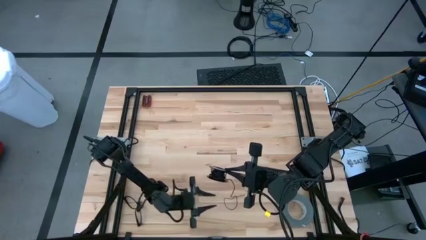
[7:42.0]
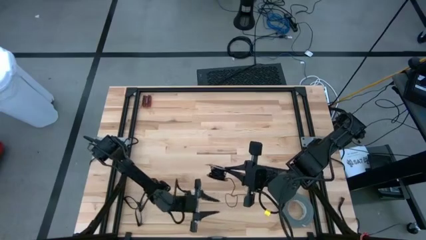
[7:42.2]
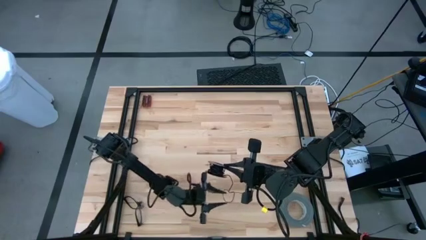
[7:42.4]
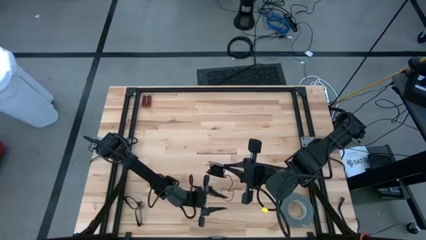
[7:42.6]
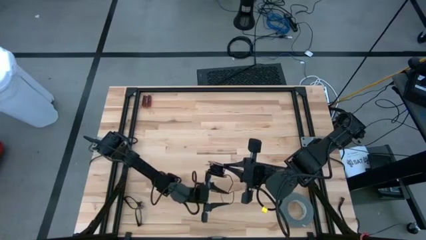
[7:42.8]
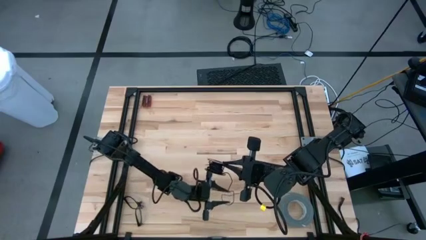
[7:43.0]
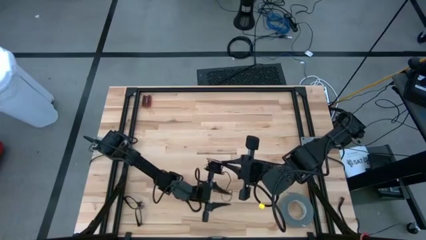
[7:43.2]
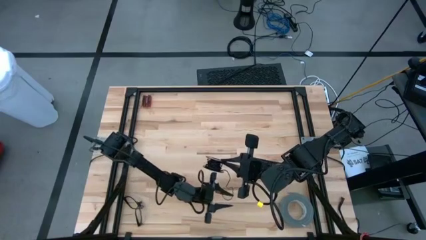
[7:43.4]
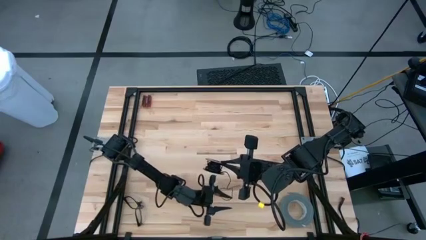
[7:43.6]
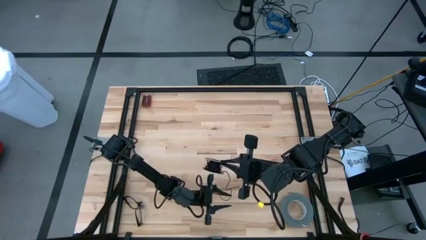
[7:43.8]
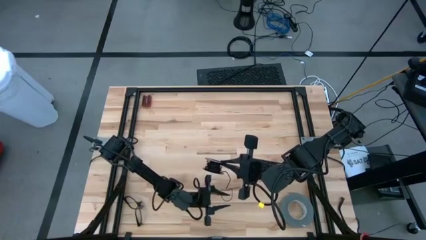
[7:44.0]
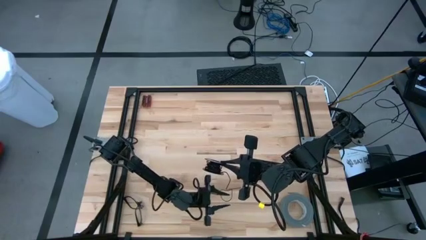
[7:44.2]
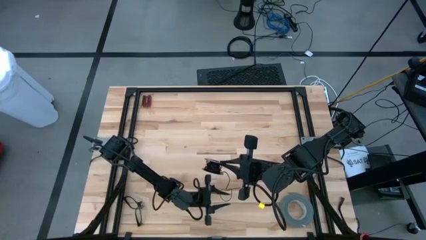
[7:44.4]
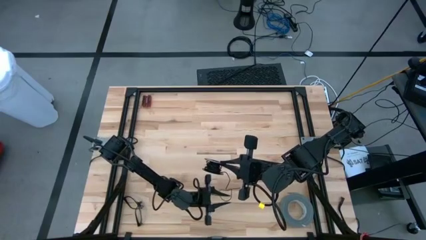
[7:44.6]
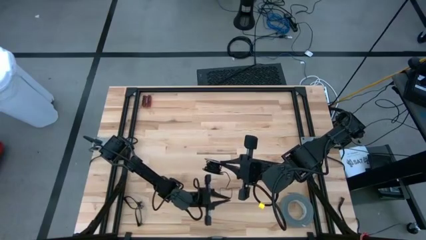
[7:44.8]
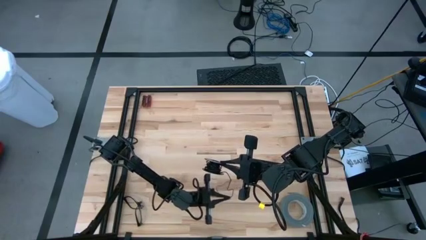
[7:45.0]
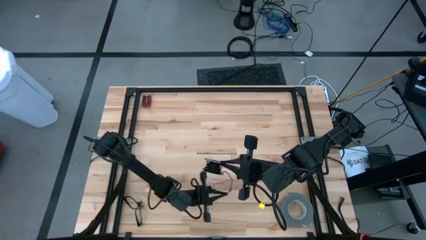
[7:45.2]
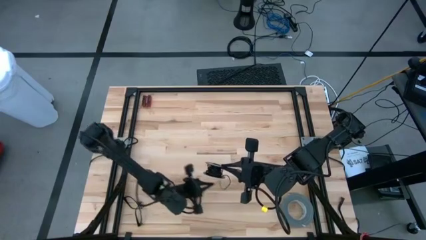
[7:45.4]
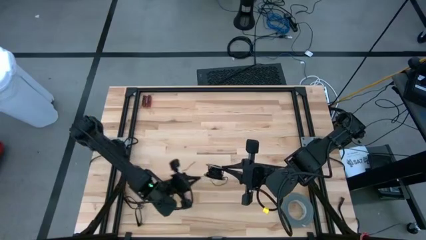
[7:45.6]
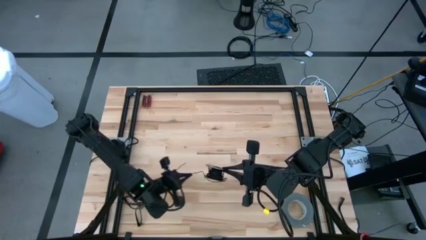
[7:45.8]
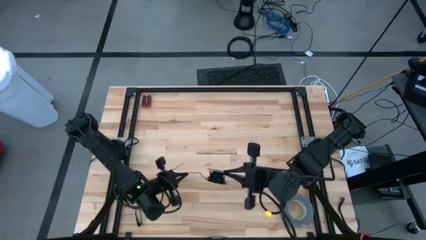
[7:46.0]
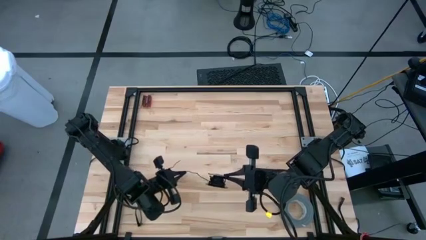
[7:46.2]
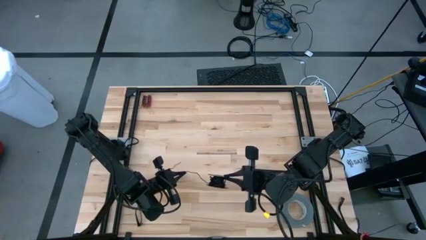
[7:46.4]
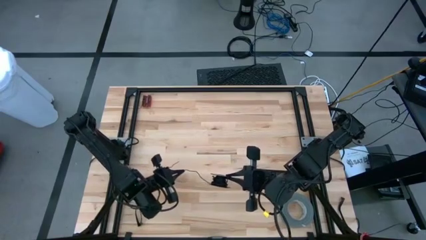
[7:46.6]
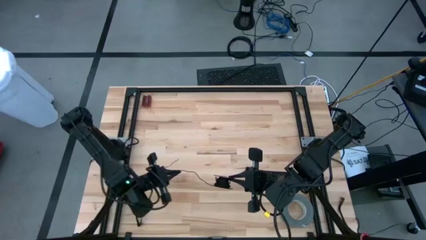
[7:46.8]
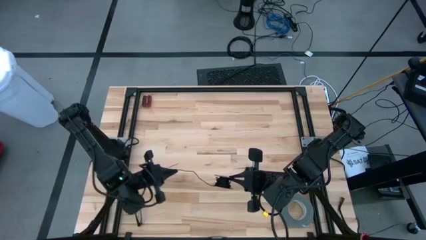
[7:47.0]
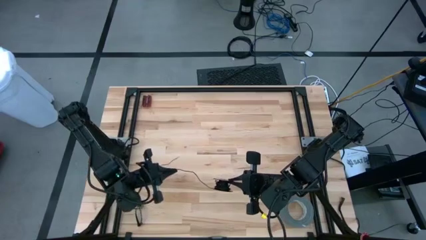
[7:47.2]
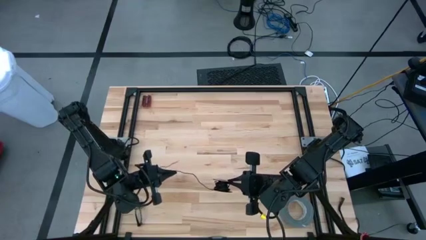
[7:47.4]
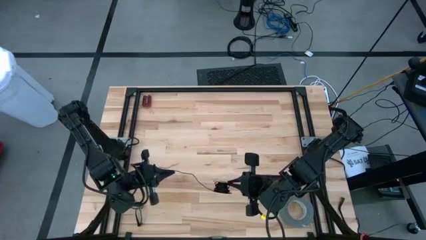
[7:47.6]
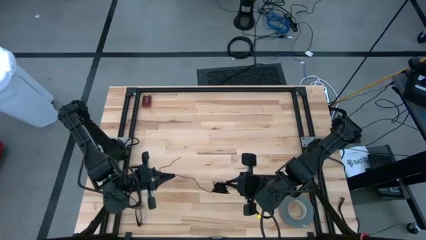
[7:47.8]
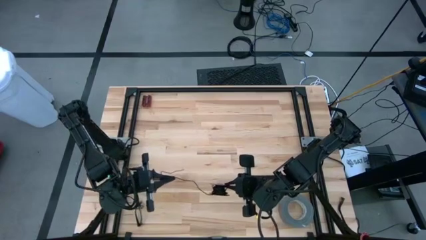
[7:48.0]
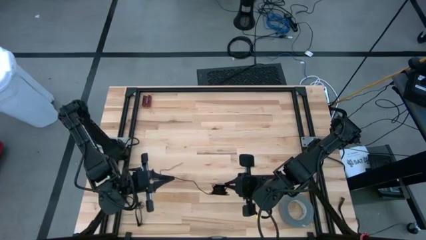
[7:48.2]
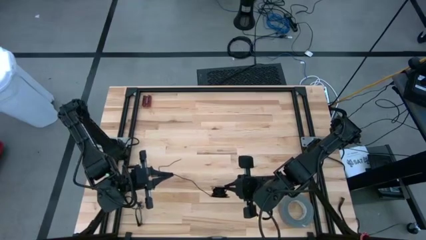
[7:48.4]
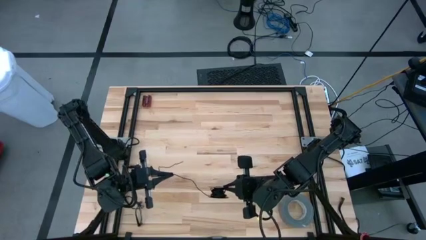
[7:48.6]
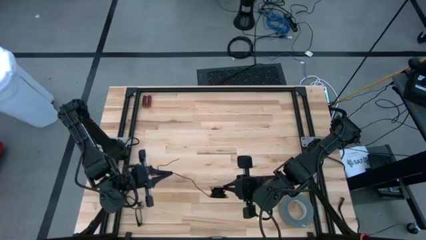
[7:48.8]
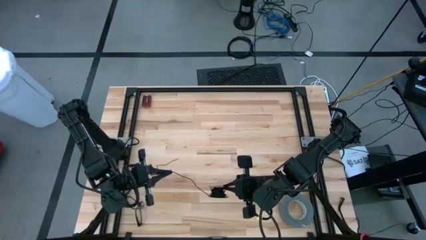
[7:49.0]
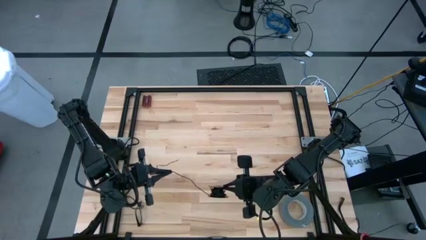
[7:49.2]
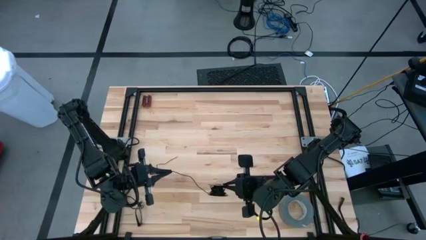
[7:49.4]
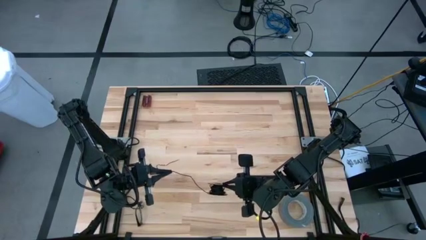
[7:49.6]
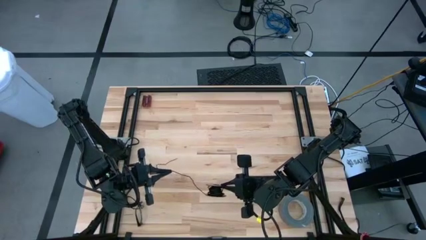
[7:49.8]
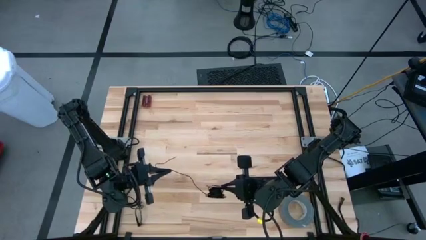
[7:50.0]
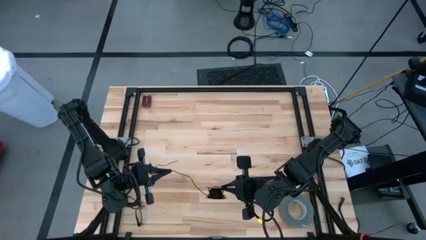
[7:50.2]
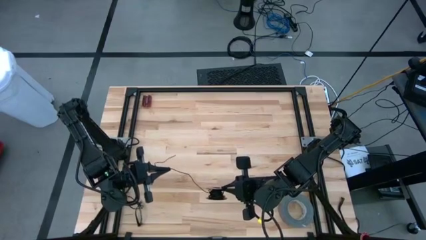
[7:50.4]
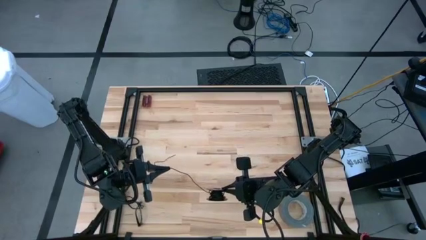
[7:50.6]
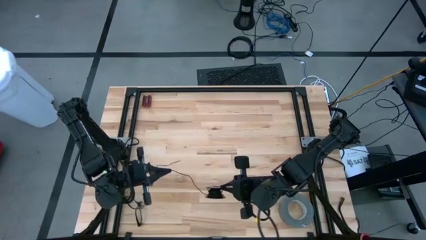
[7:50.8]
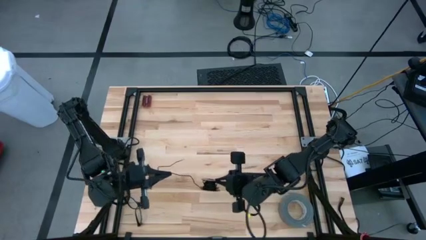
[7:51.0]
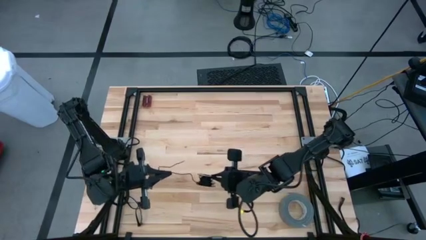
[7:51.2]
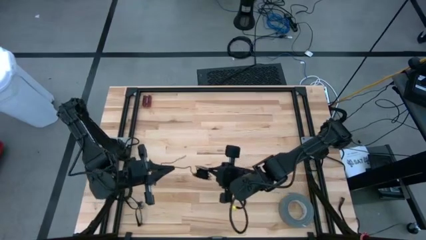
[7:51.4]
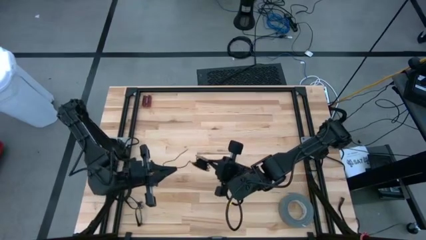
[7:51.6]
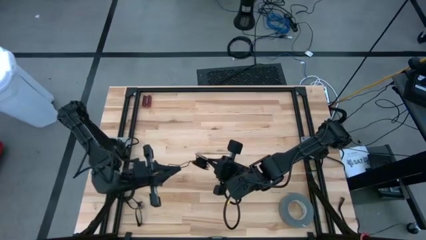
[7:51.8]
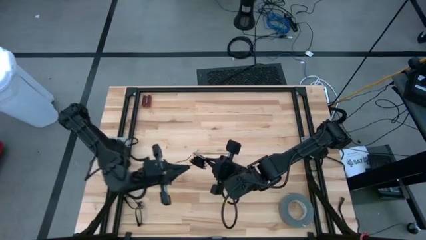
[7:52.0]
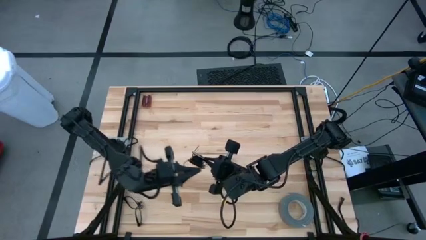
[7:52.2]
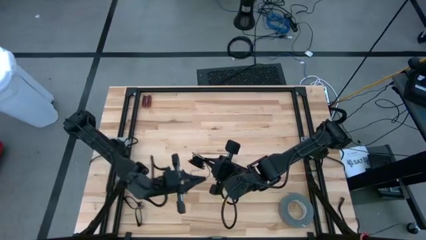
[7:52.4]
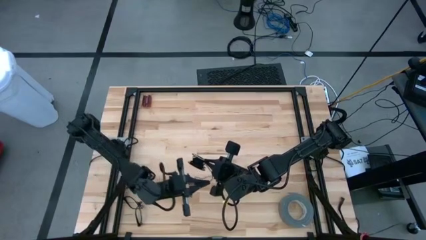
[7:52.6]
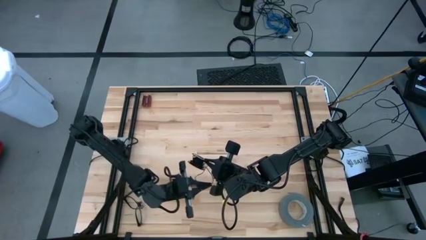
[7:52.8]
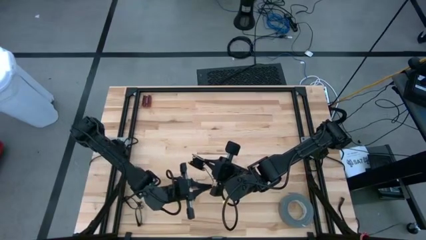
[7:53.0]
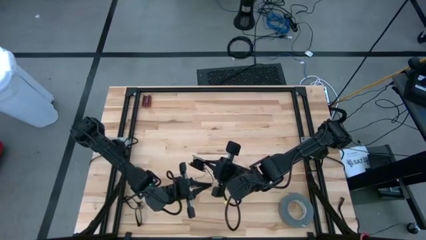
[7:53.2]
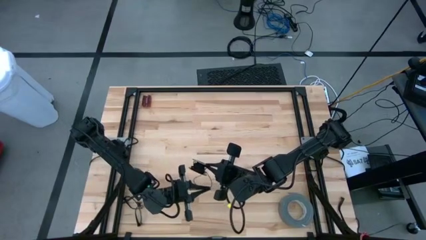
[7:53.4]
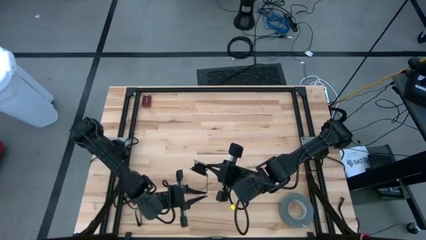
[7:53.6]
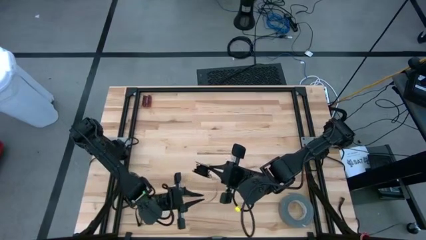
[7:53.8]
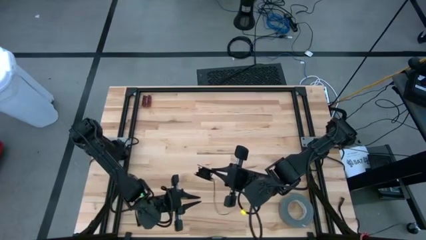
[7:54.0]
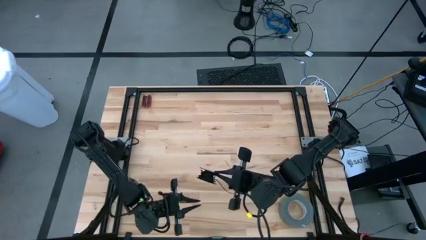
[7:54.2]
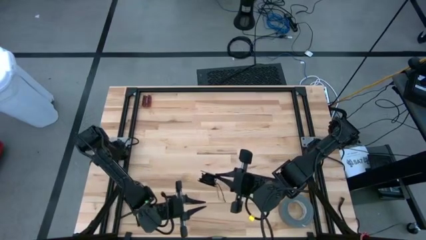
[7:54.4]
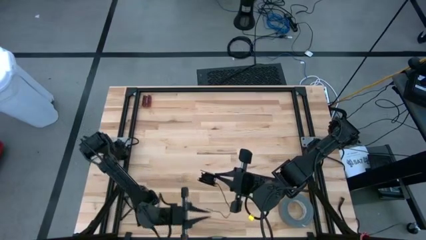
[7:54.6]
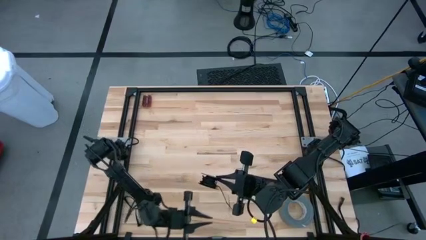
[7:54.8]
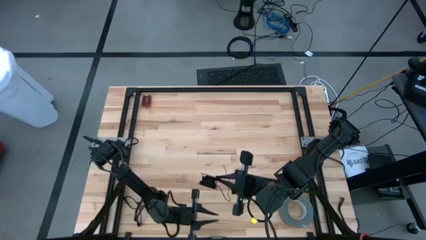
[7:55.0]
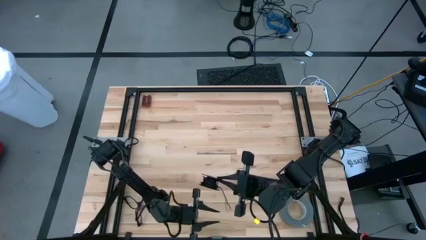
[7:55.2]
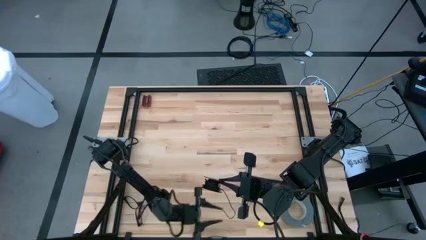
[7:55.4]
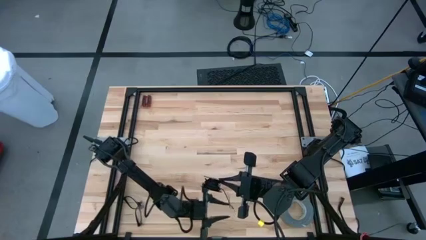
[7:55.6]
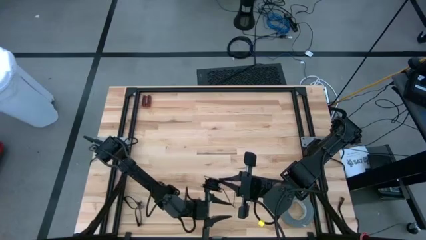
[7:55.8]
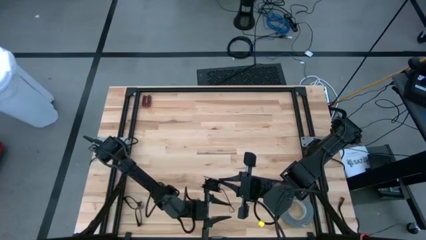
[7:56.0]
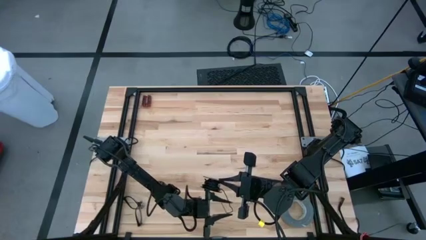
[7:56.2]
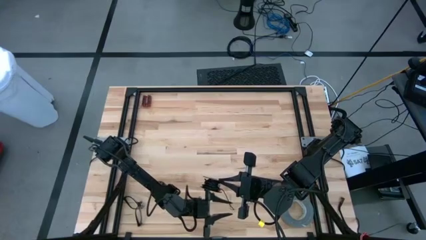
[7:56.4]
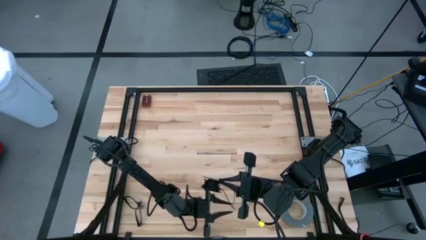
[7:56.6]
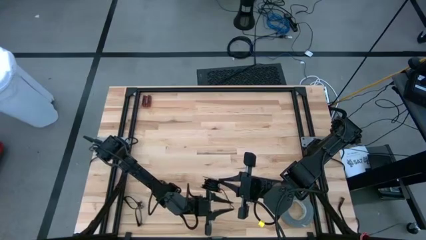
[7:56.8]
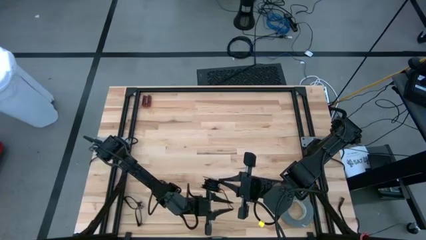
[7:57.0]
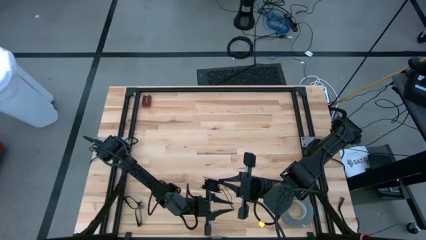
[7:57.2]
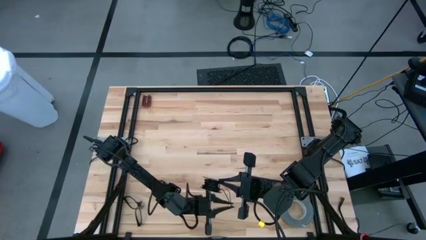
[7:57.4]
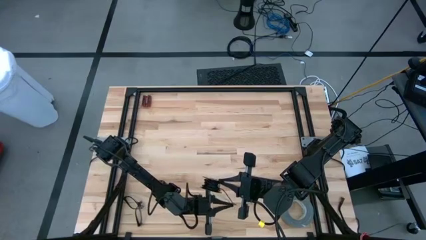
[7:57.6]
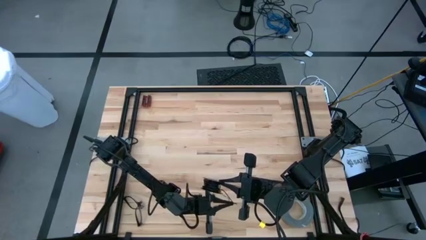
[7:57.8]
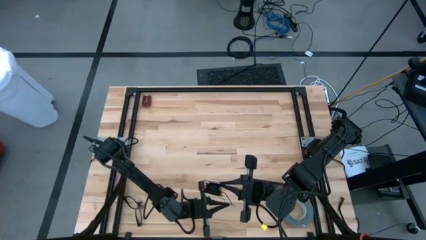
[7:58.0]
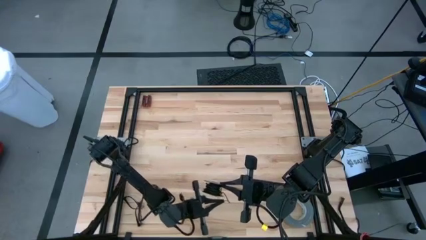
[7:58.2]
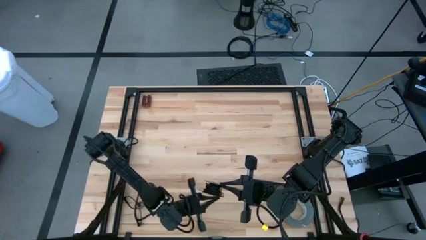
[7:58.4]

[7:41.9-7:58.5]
Task: Coil cords
Coil the black wire on the spool
